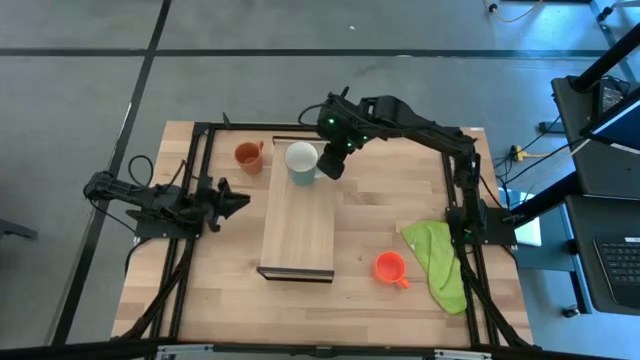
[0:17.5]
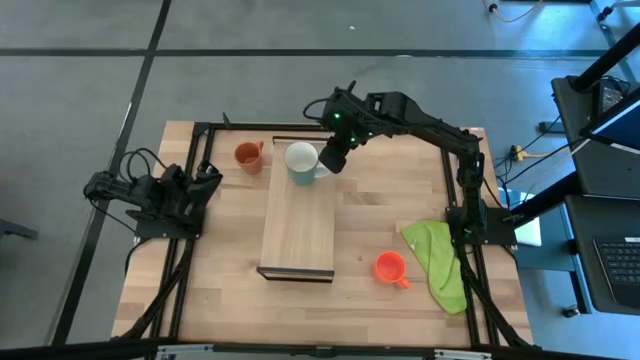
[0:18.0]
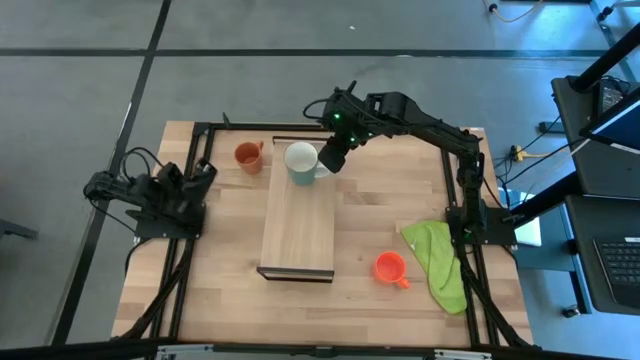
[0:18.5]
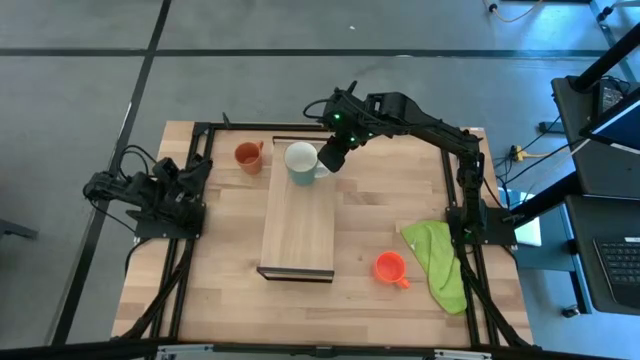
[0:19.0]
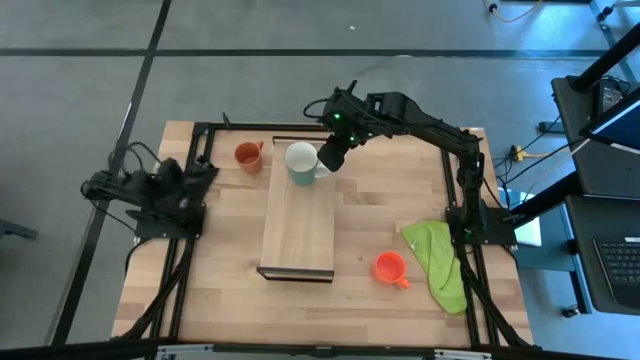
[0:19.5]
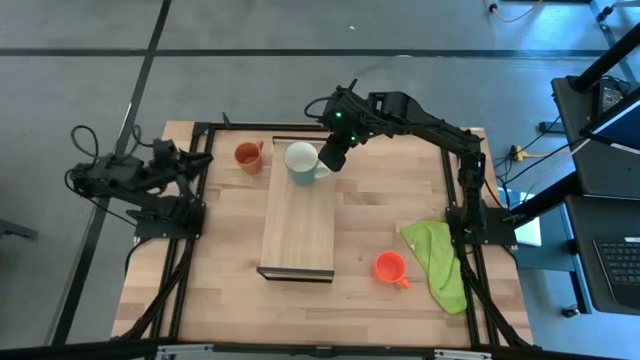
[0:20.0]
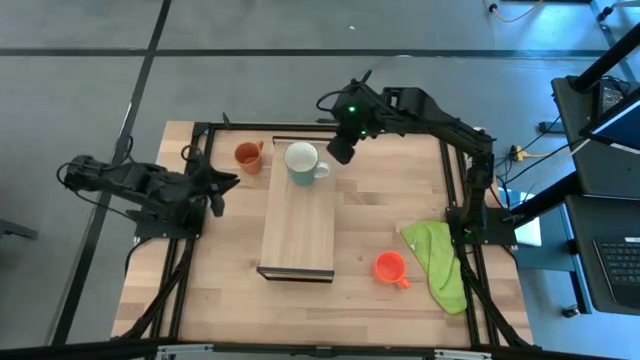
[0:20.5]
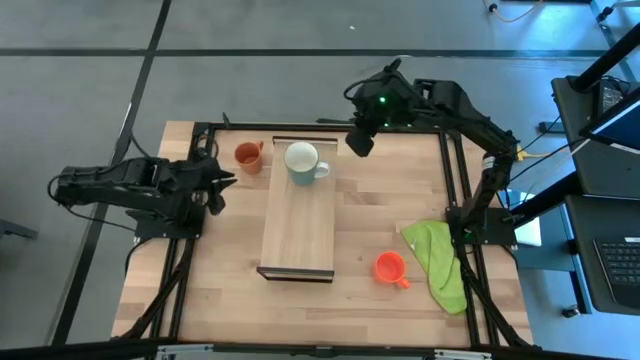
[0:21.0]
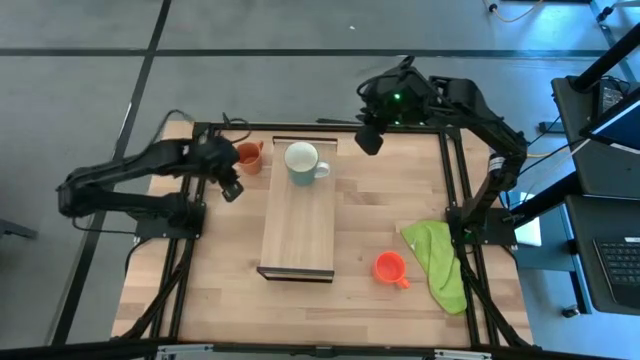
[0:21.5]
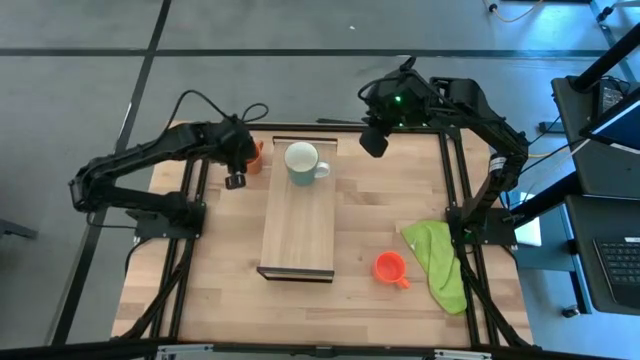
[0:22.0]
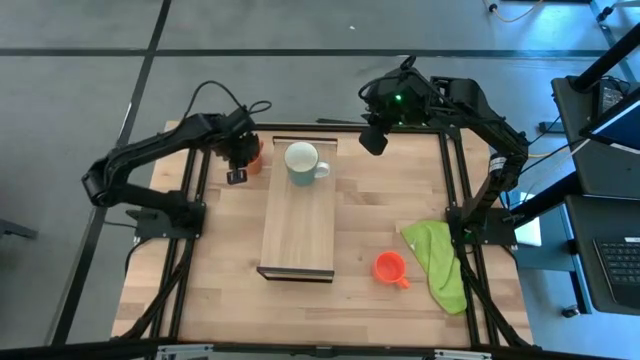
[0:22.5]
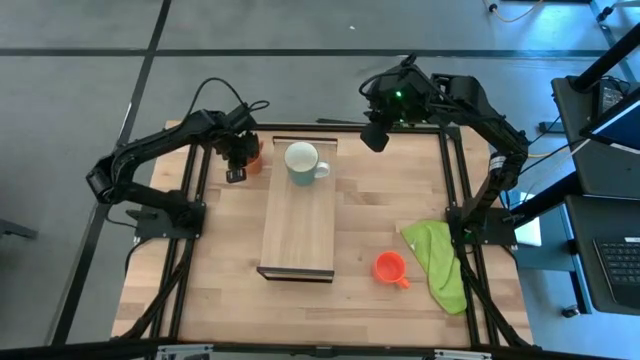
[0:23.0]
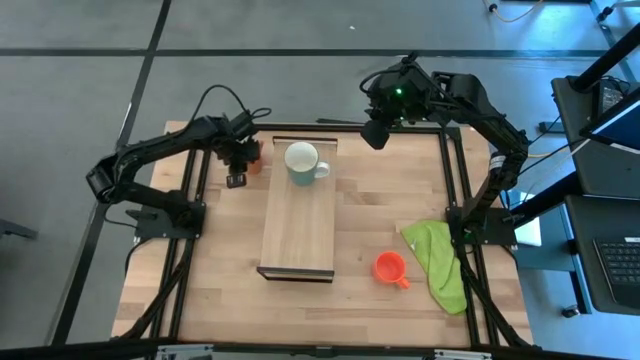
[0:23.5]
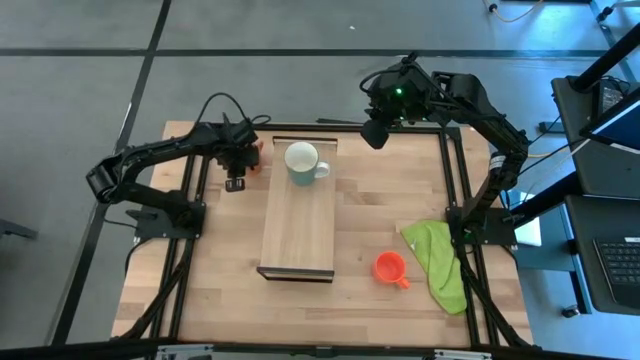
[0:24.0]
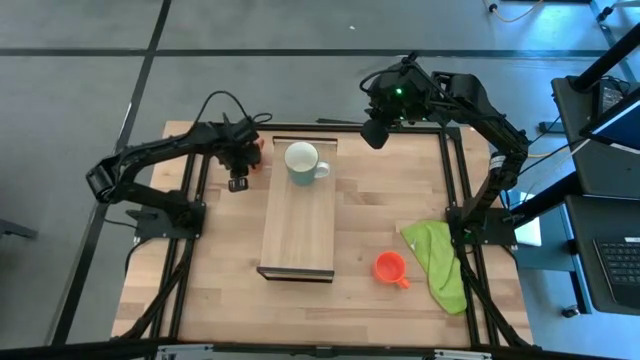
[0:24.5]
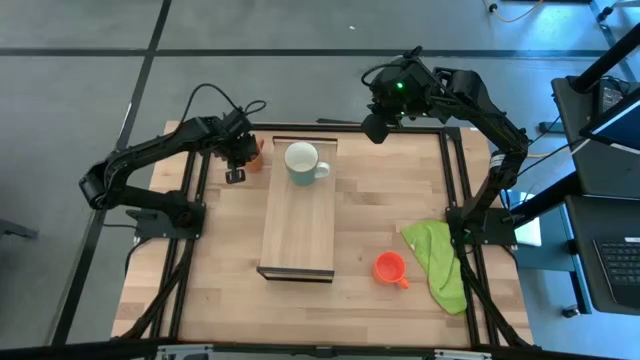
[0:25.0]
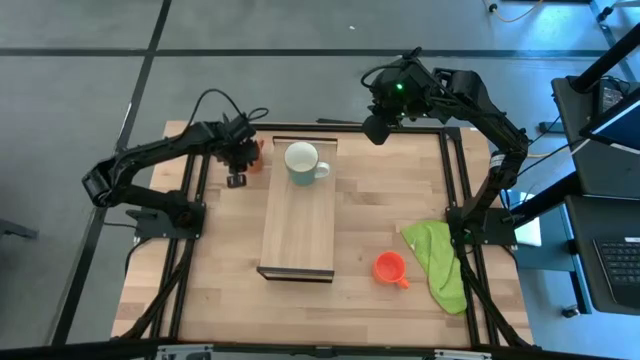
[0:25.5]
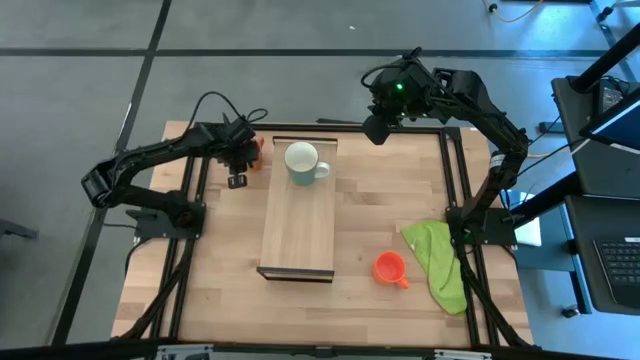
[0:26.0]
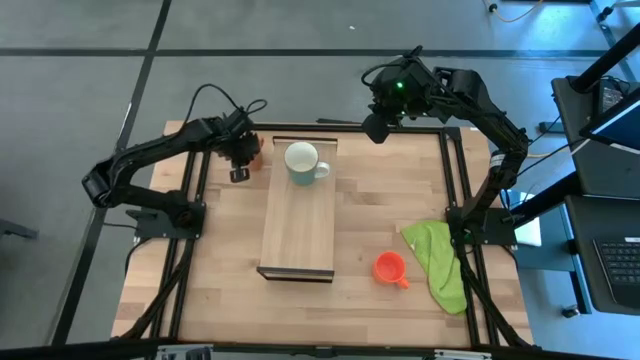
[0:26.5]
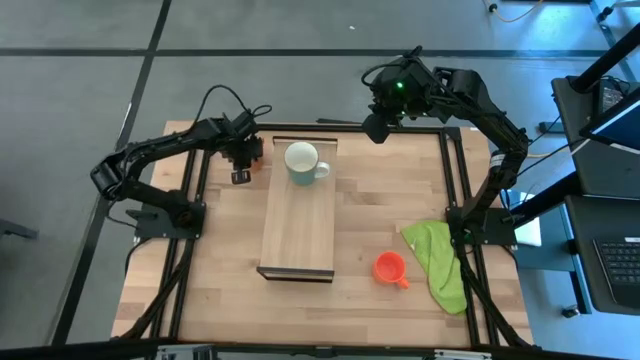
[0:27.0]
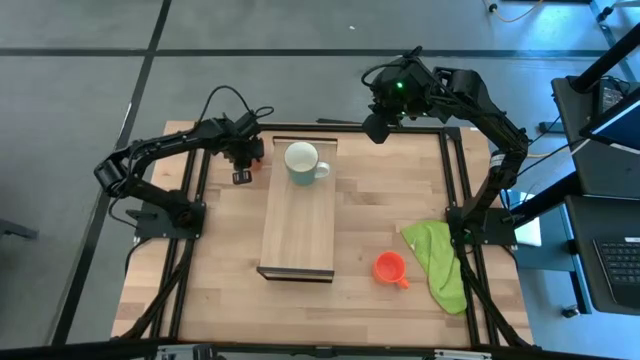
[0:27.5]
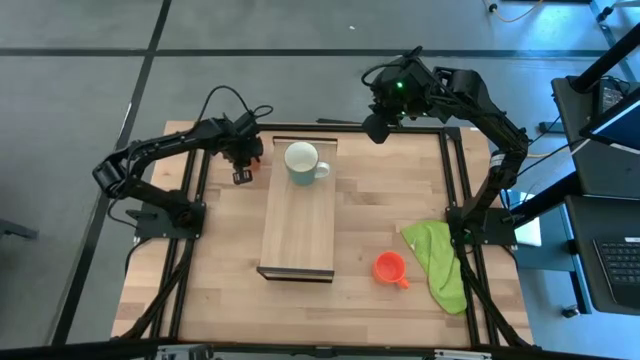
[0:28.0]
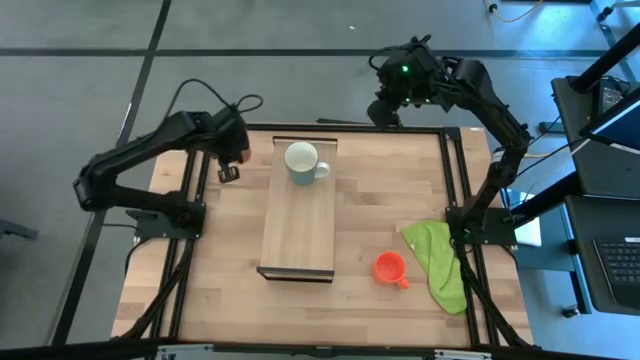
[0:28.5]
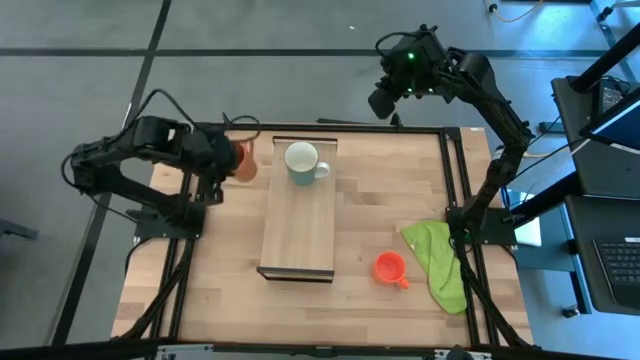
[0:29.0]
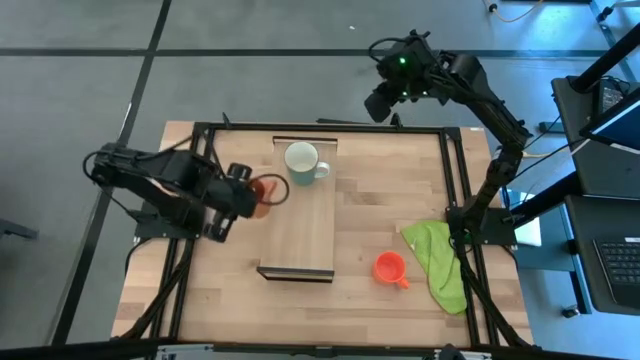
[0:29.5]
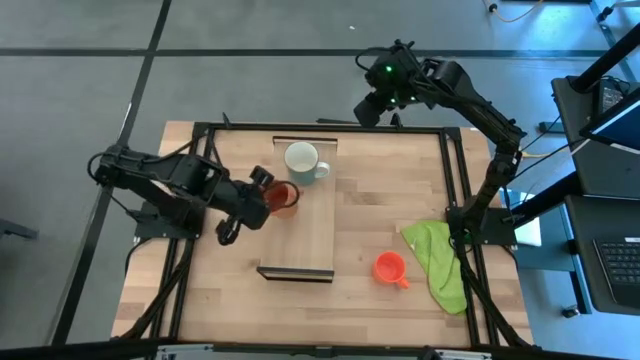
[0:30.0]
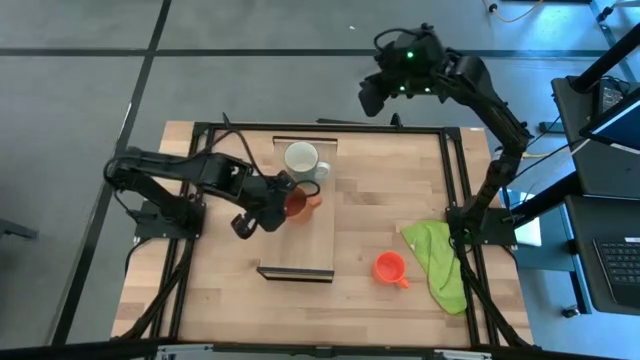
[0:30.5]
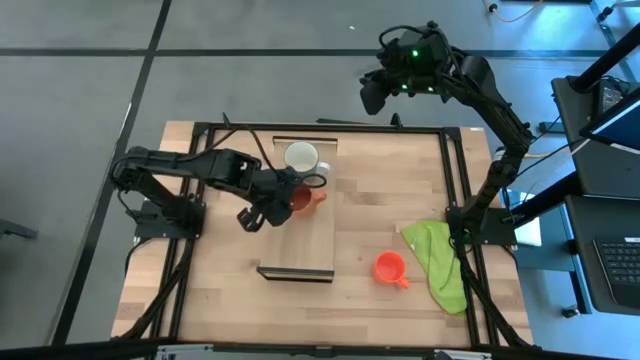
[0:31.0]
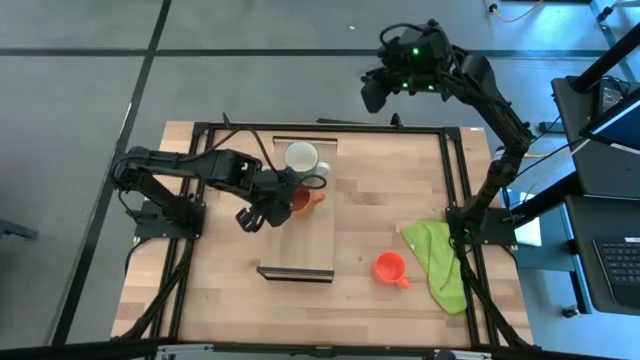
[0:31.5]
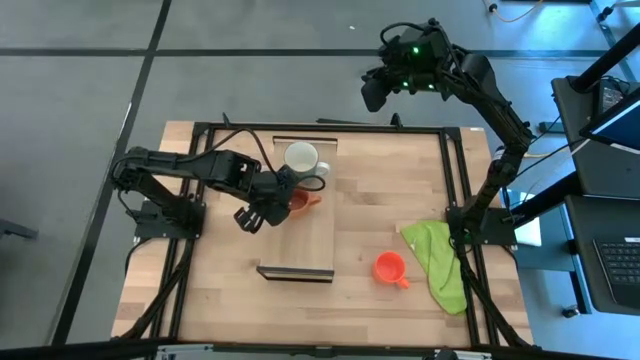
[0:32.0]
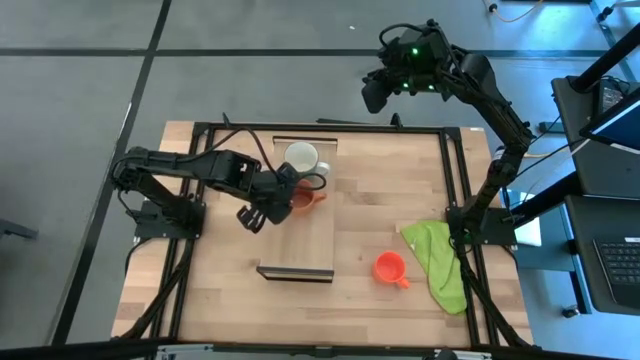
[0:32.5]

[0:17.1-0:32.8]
Task: Stack small to large cups/mugs on shelf
Put the brown mug on the shelf

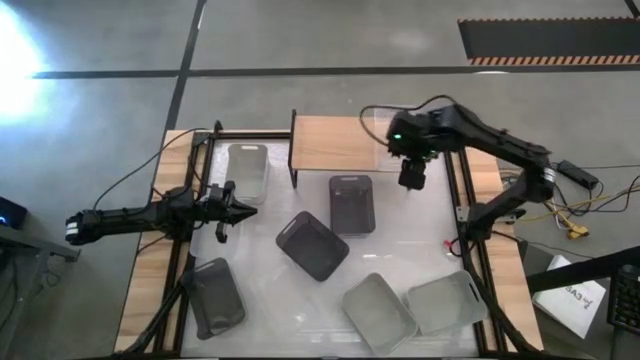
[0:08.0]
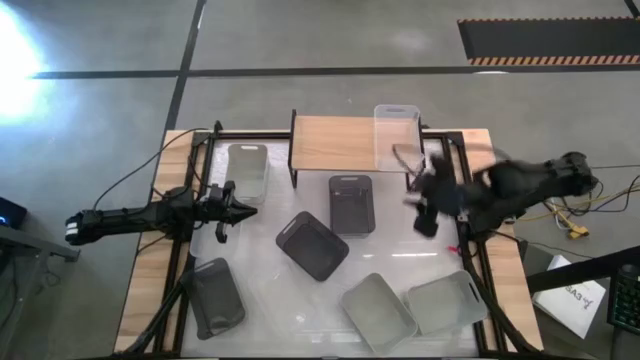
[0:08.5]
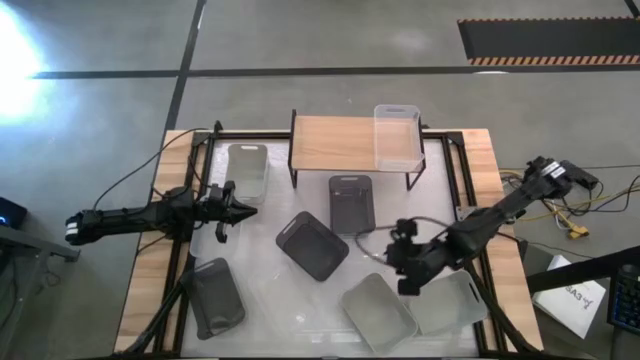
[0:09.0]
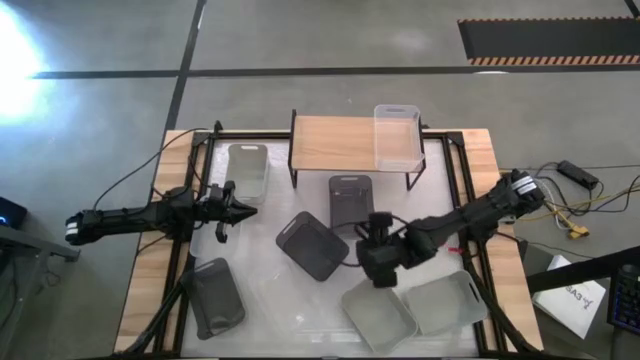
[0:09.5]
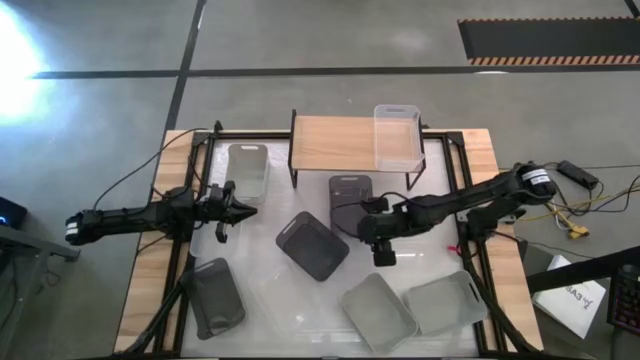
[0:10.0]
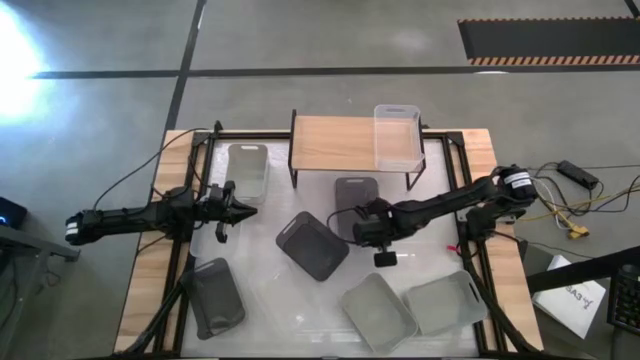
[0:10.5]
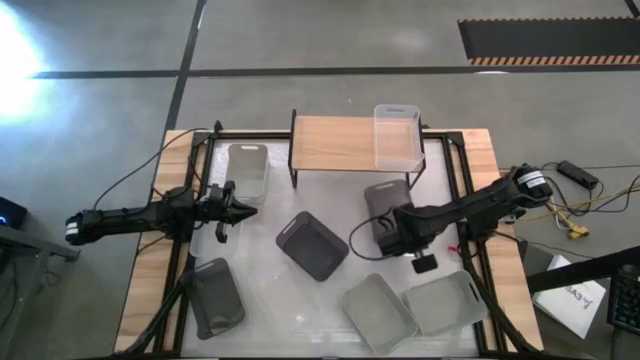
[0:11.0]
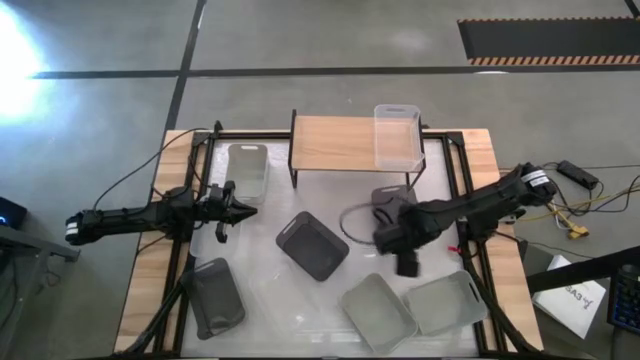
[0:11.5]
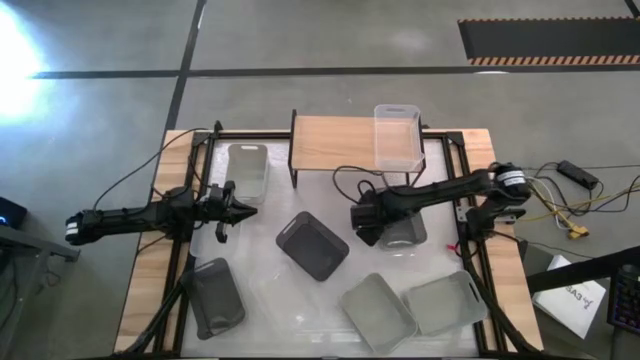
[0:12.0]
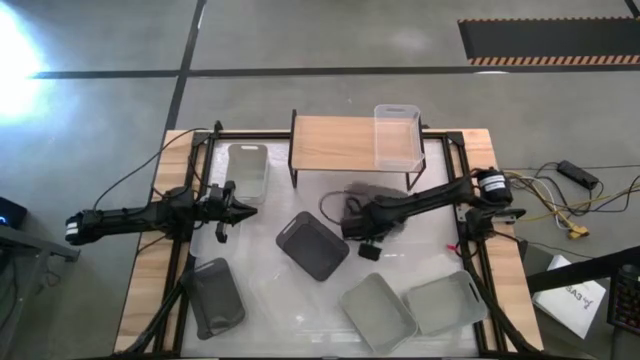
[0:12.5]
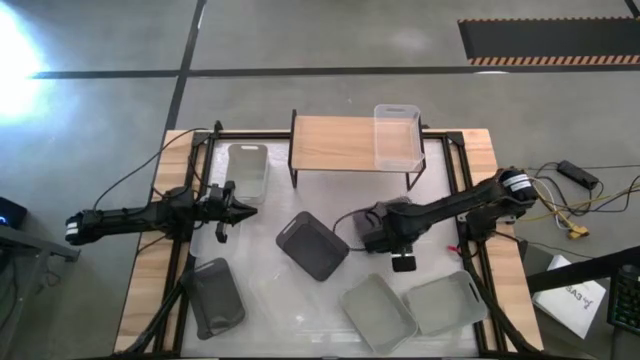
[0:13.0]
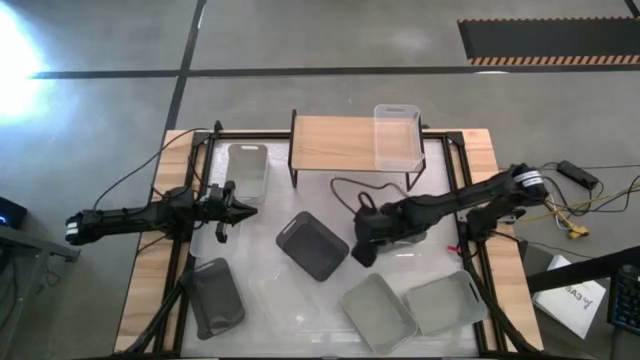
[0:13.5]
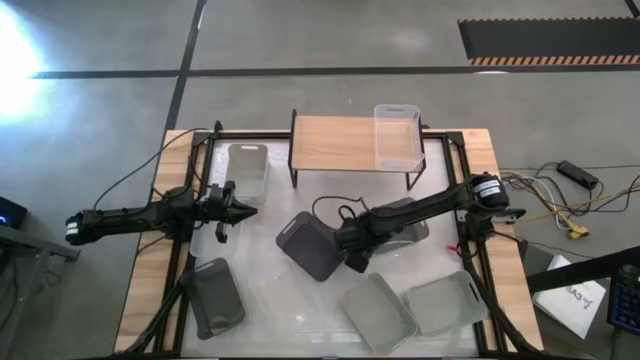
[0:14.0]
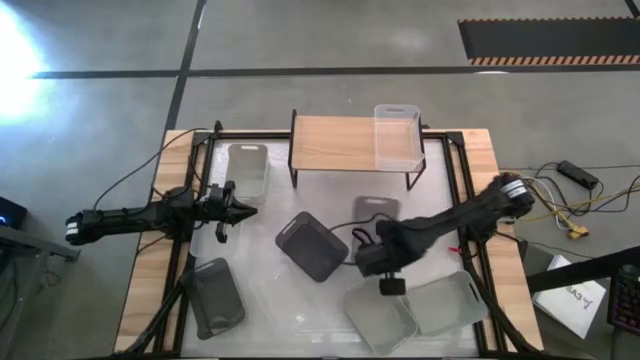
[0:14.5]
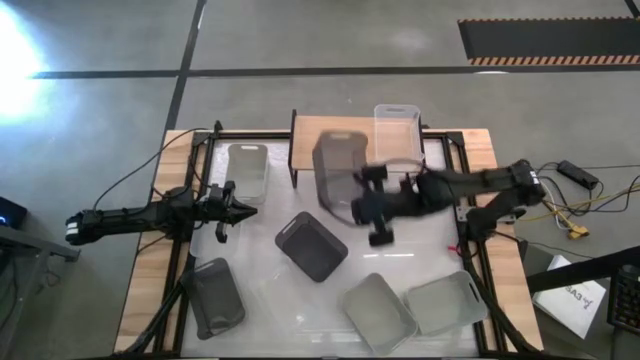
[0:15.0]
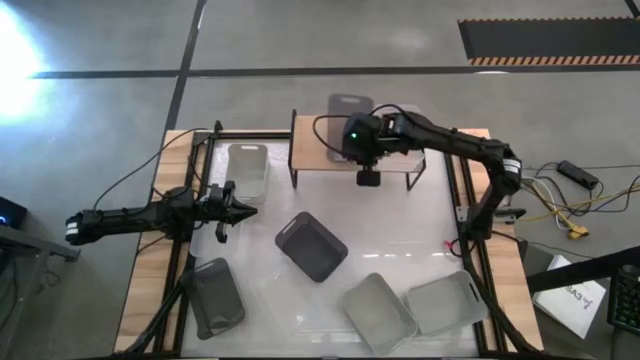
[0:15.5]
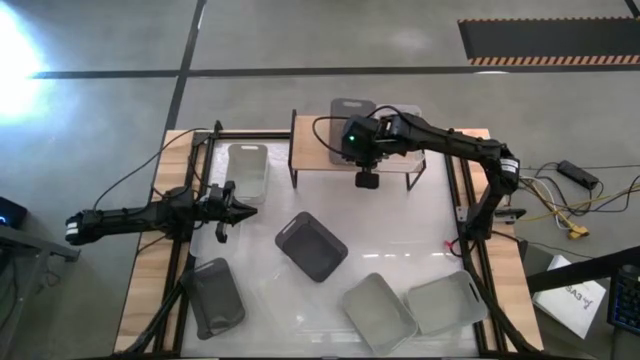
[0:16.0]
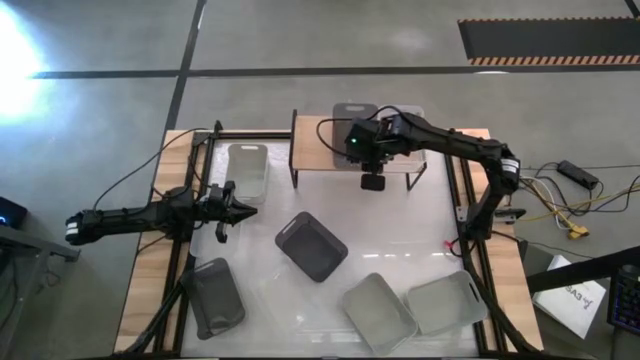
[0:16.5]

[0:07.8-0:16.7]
Task: Stack baskets on shelf by color
Put the top black bin on the shelf
